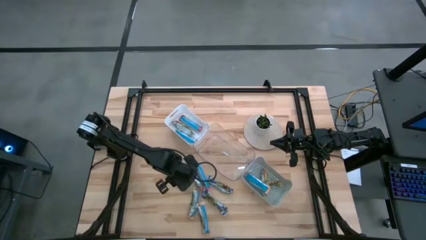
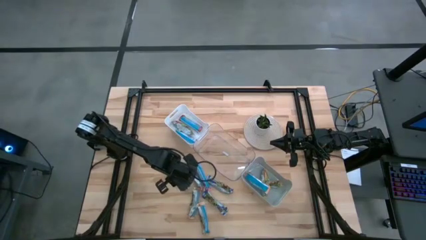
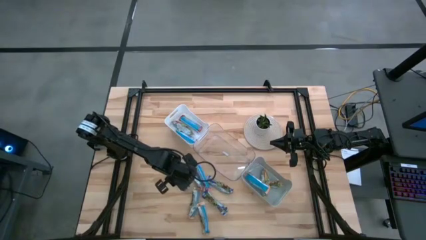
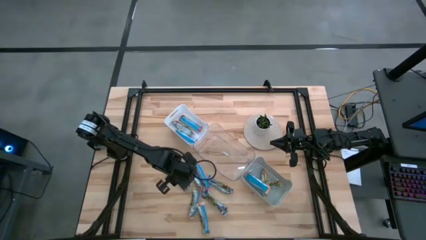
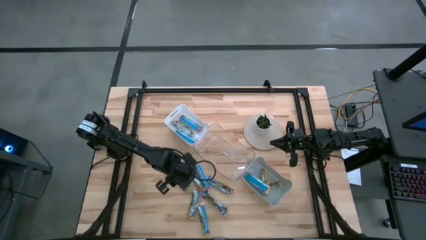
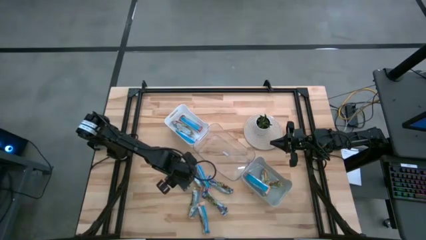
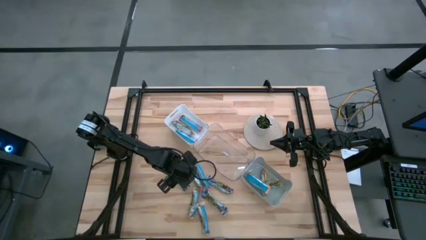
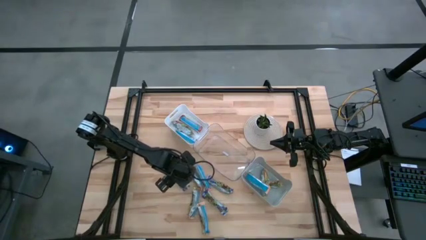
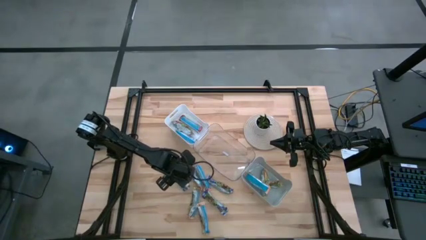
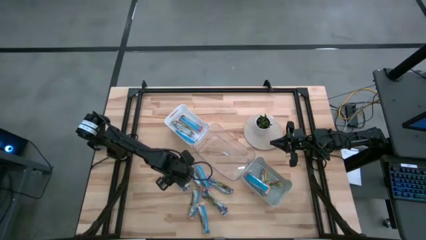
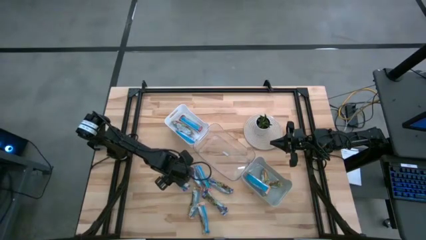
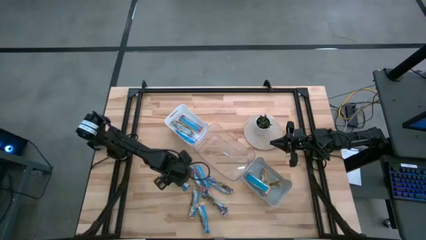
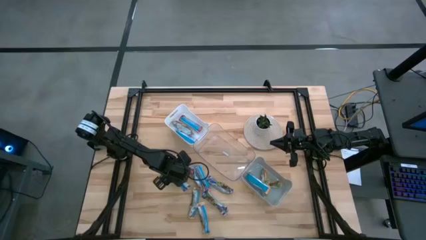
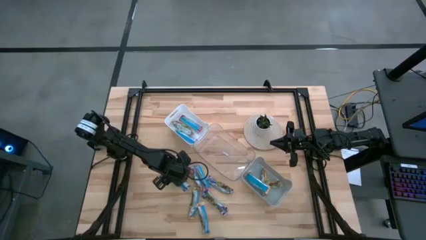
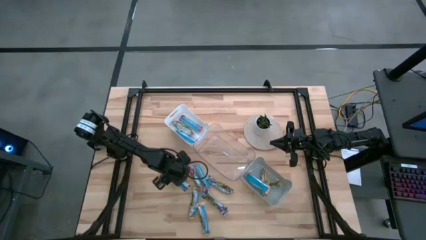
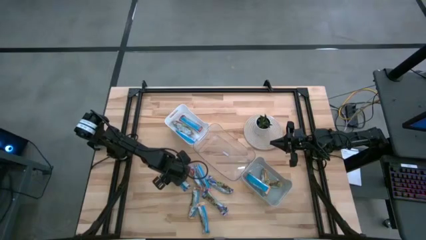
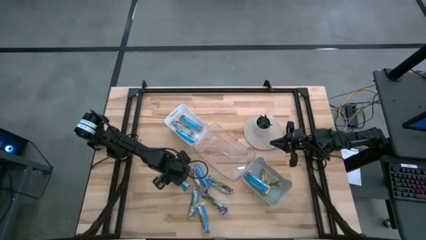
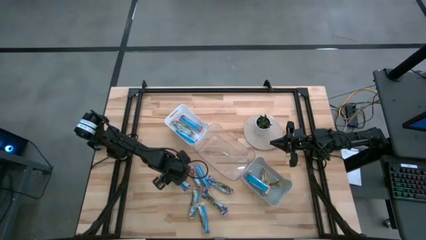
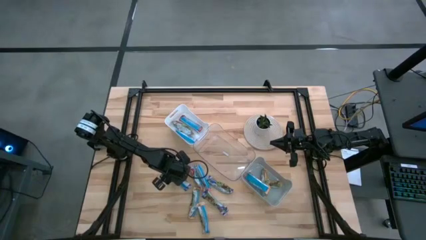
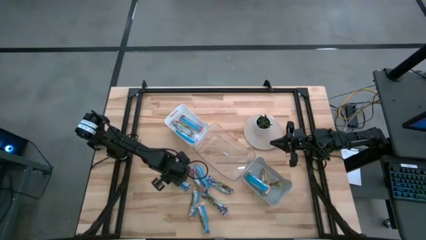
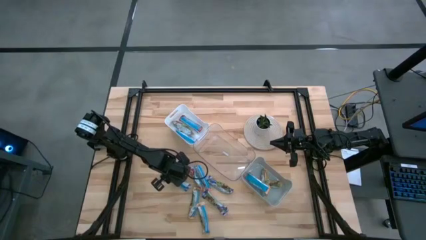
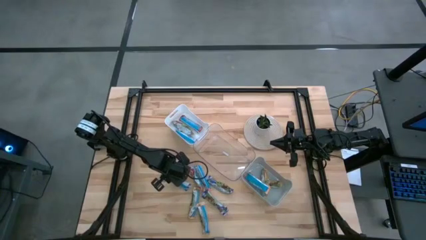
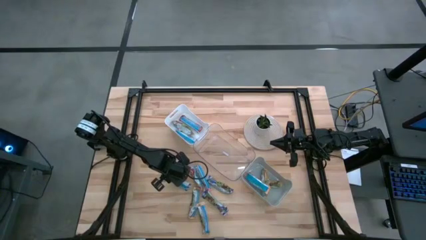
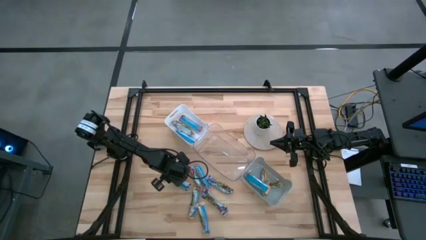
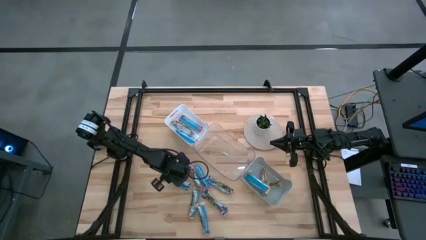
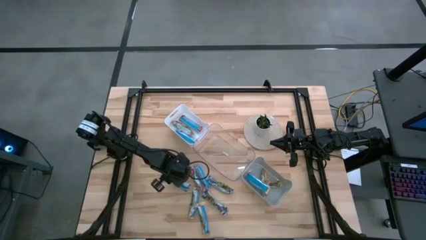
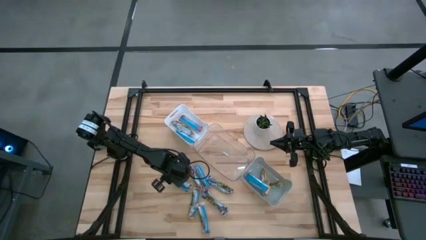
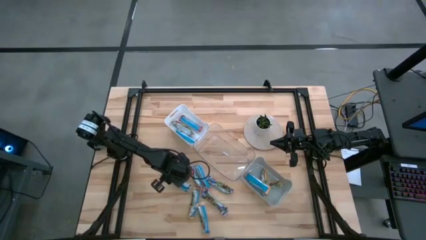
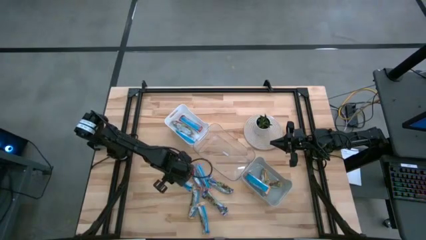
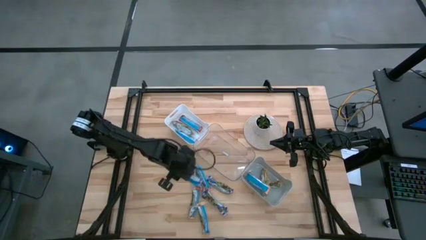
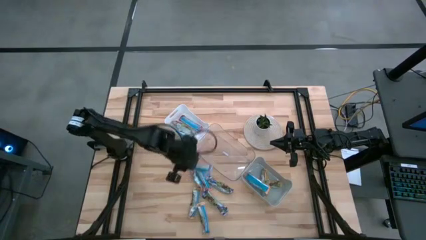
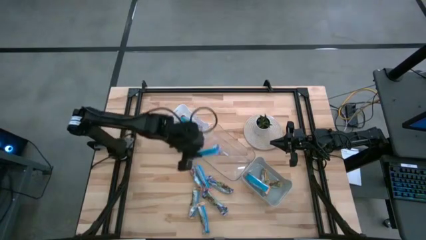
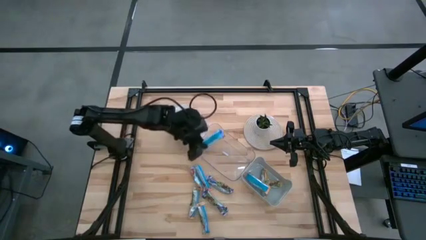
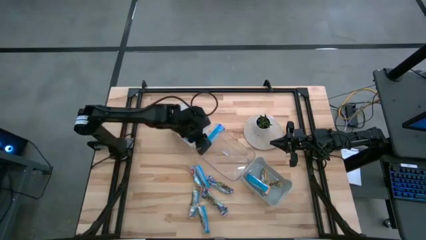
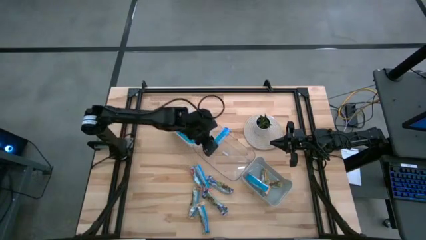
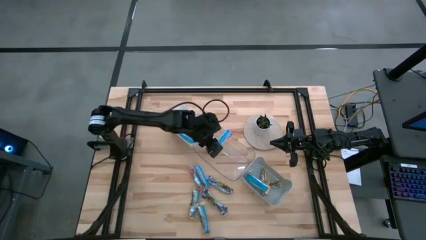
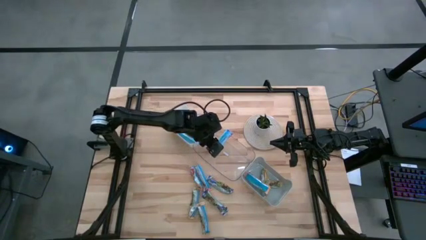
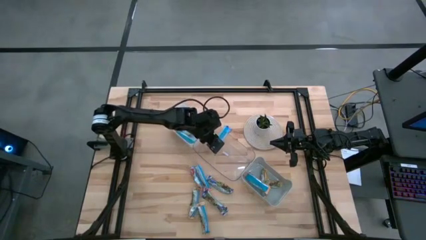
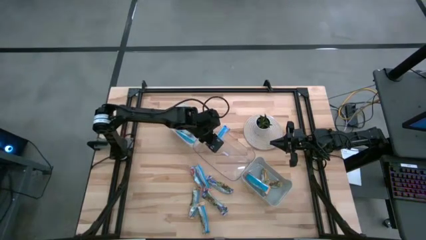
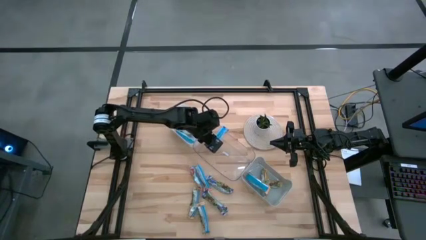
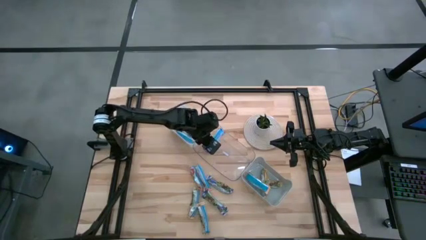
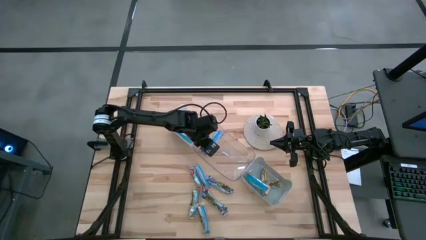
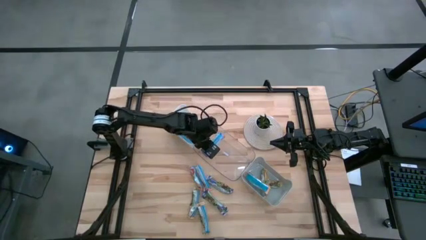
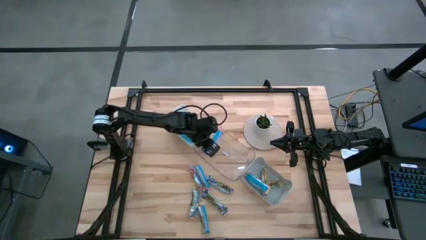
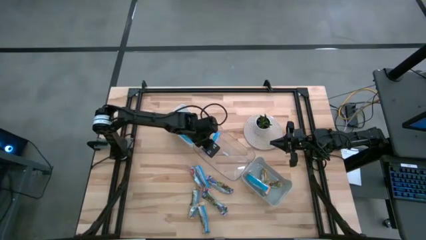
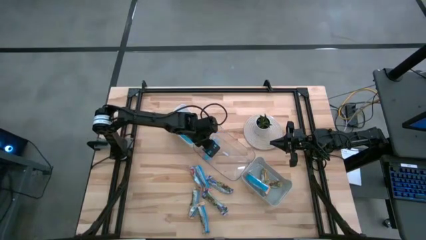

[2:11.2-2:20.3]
Task: Pick and place Granola Bars by type
Put the blue granola bar into the transparent bin

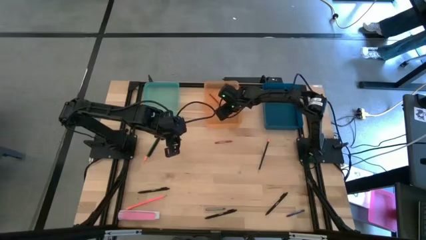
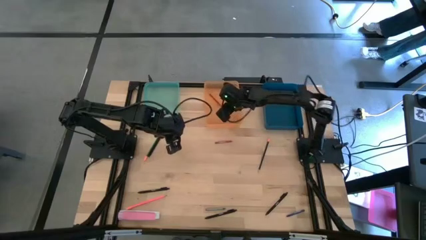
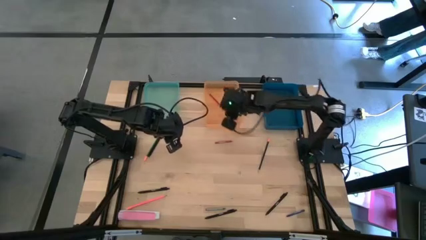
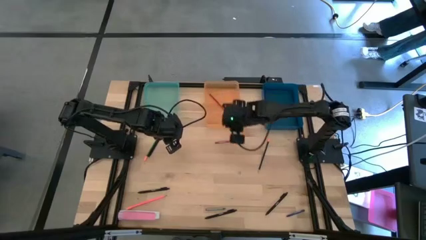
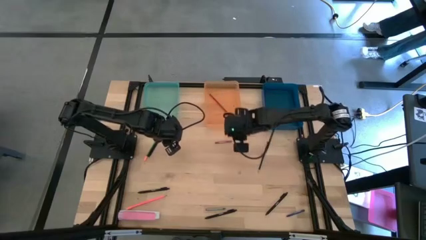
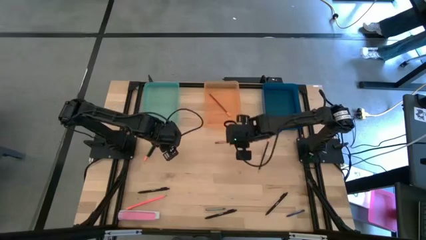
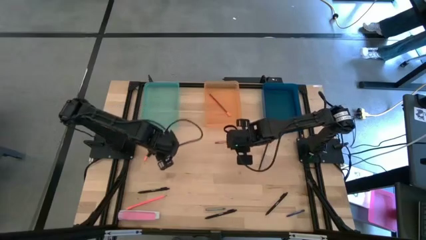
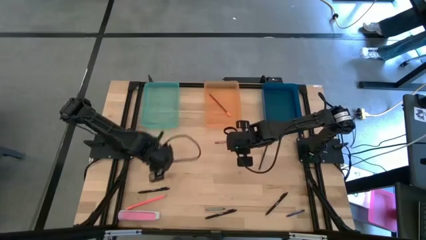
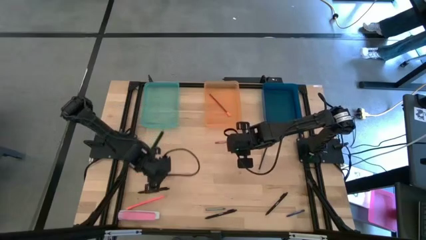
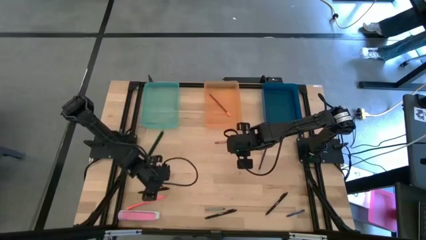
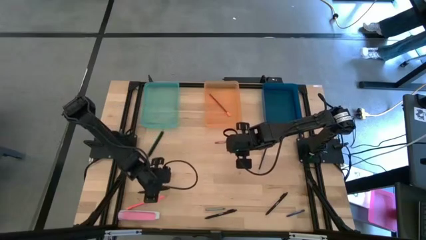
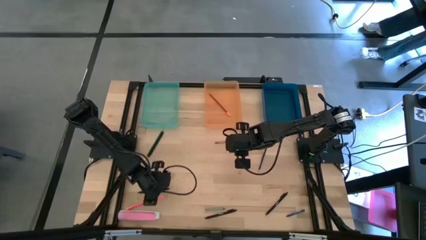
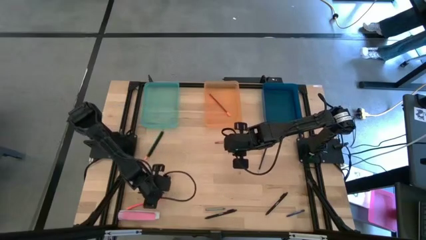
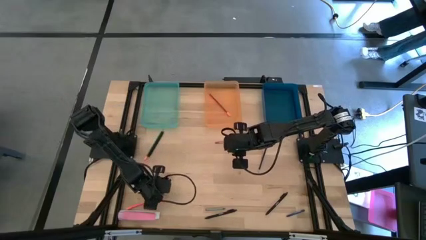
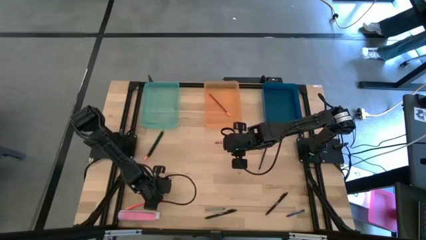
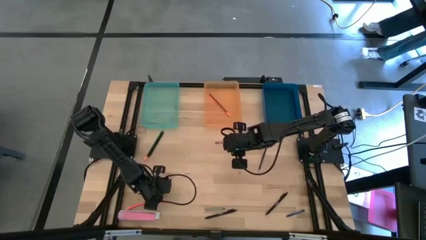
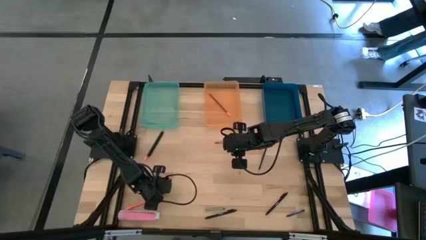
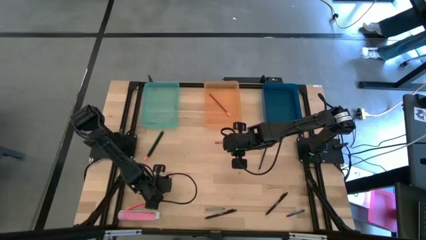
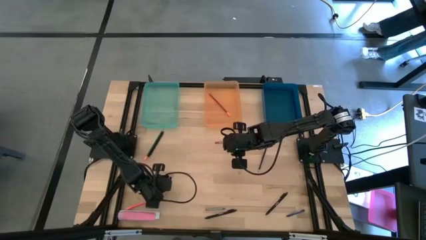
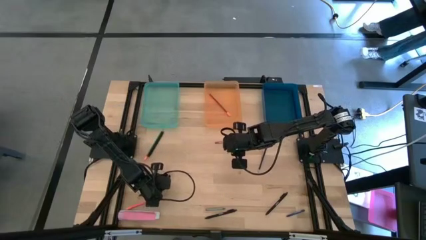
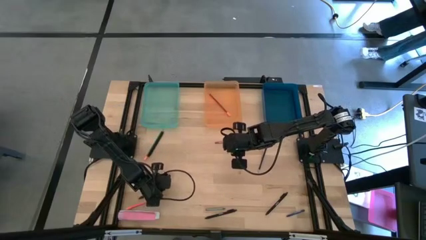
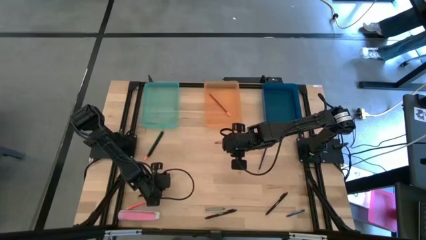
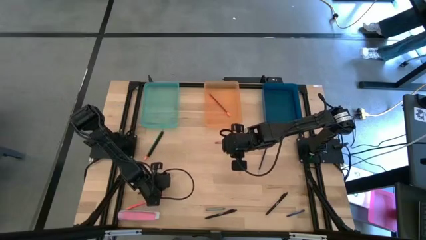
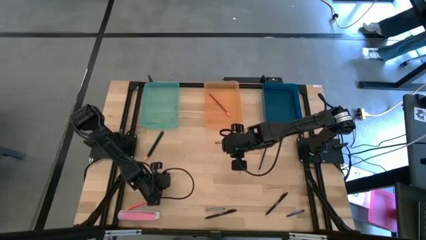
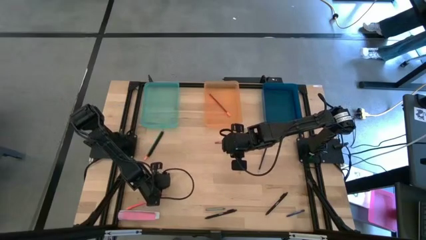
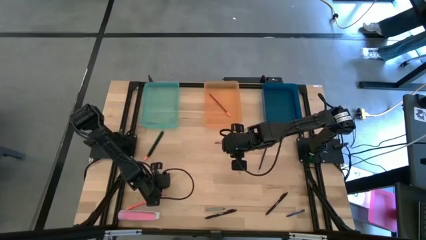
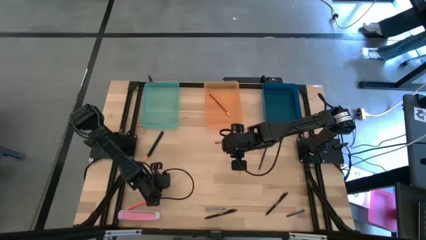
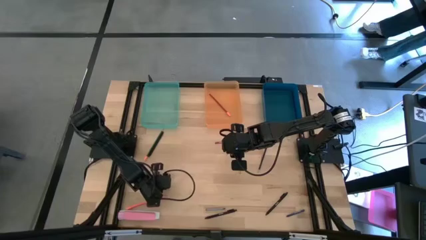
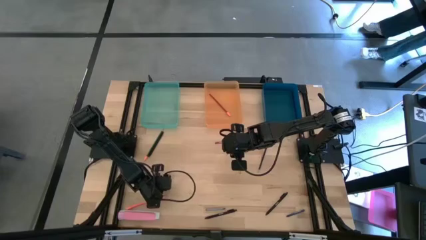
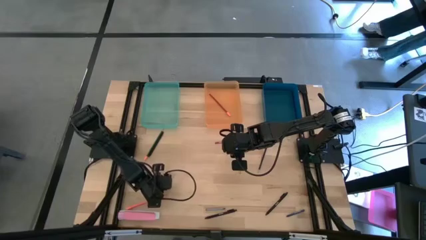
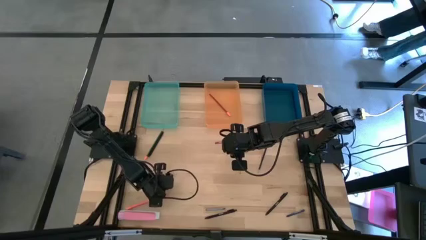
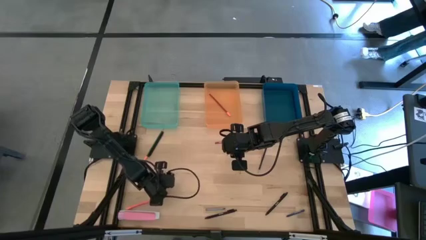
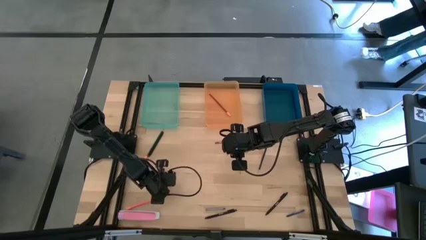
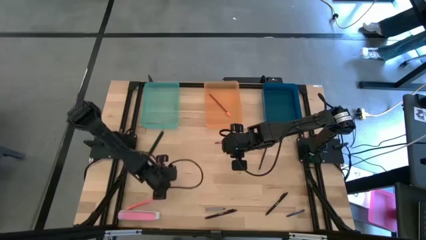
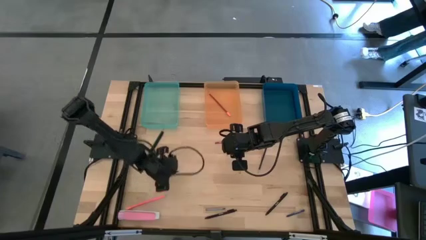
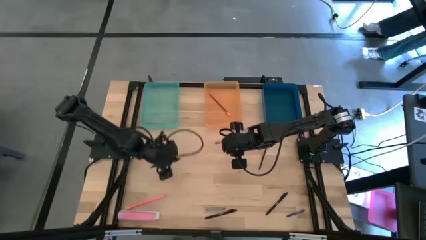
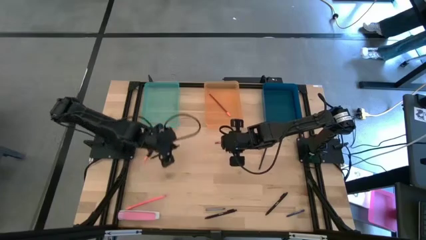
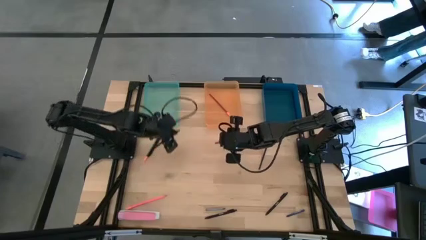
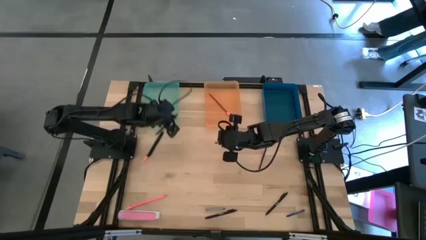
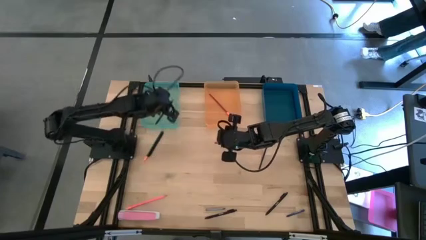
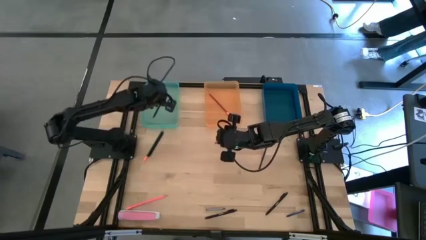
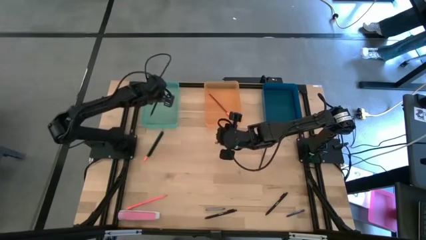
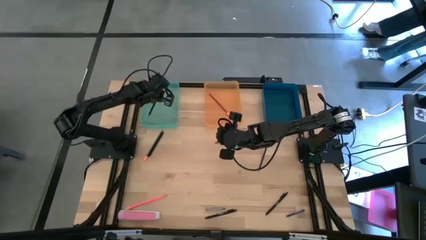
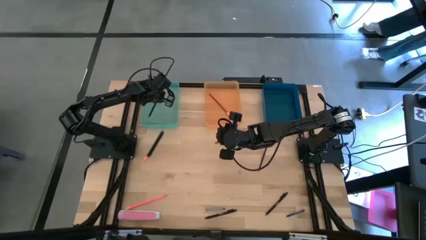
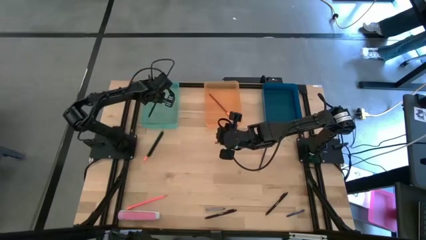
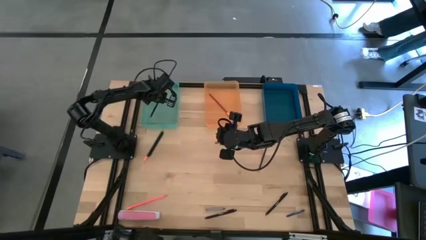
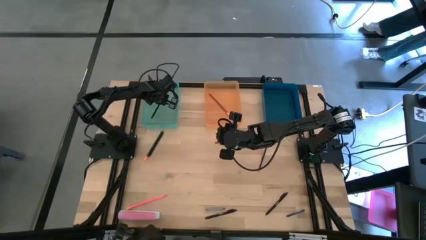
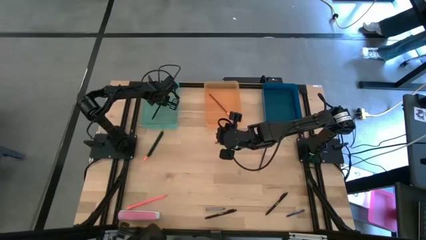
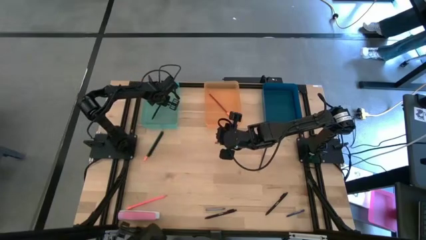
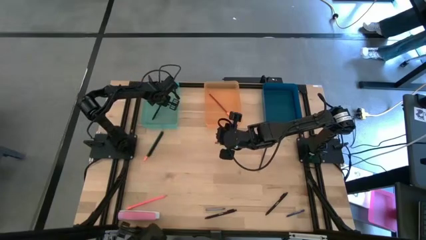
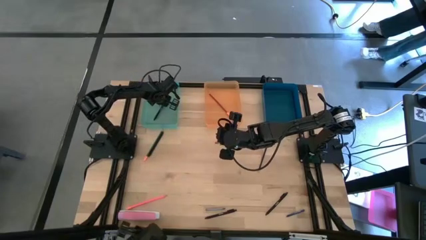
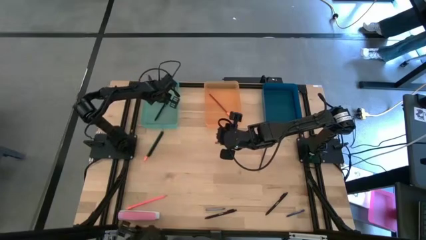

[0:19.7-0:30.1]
Task: Sort crayons/erasers/pens/pencils in bins
Put the black pen into the green bin
